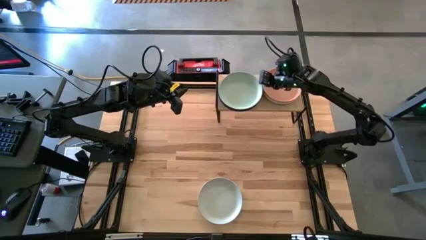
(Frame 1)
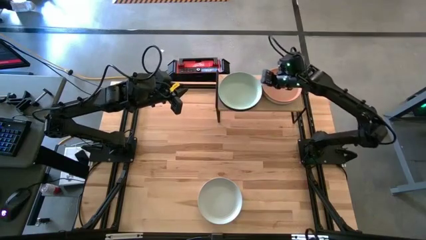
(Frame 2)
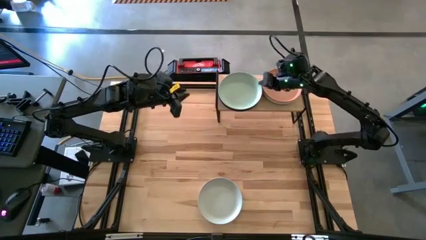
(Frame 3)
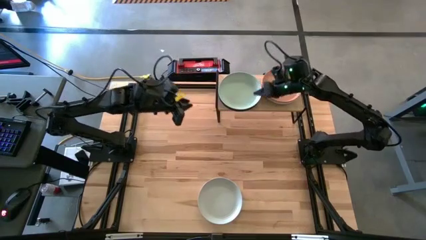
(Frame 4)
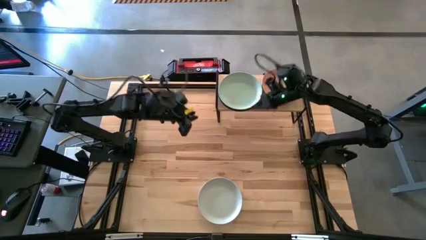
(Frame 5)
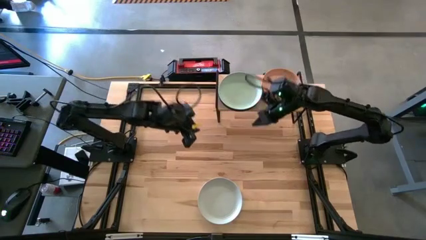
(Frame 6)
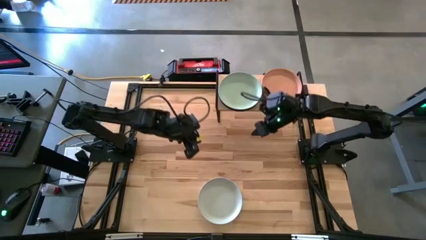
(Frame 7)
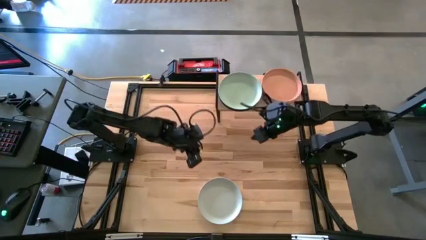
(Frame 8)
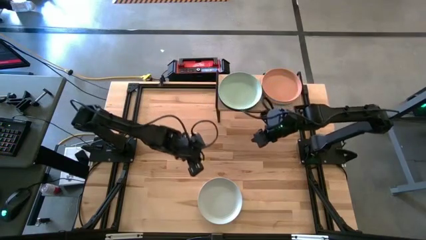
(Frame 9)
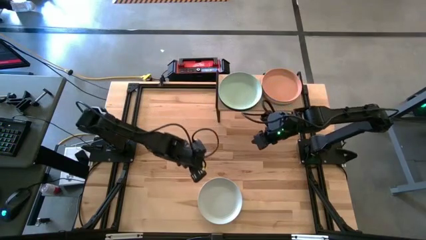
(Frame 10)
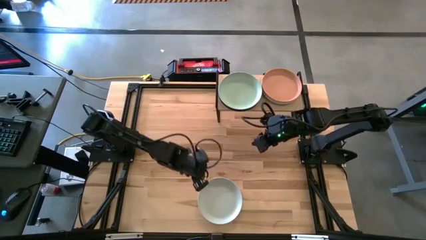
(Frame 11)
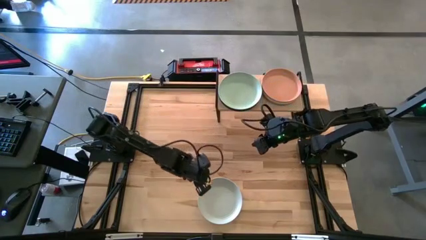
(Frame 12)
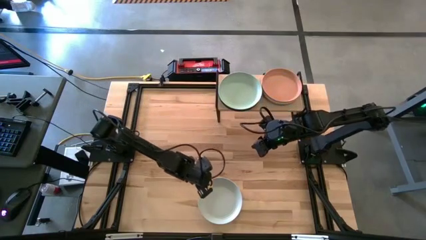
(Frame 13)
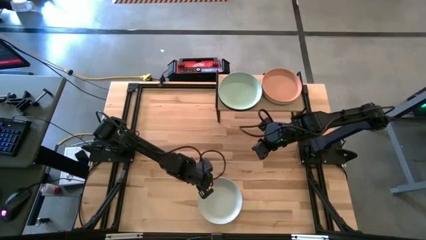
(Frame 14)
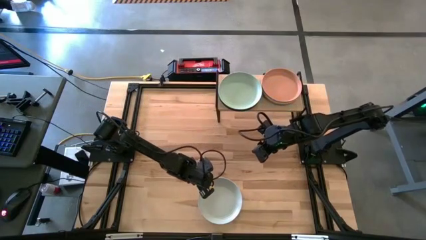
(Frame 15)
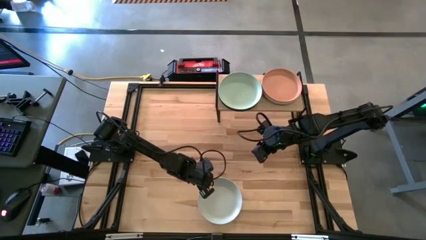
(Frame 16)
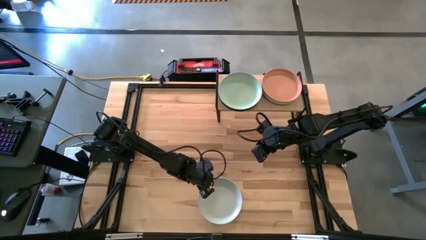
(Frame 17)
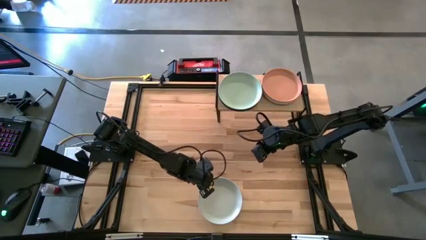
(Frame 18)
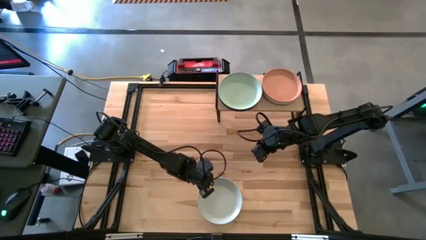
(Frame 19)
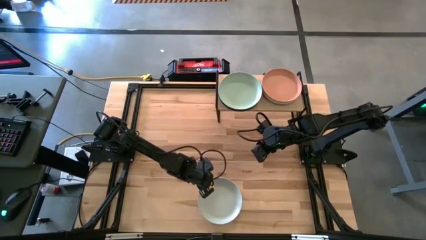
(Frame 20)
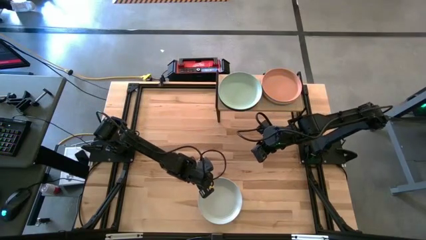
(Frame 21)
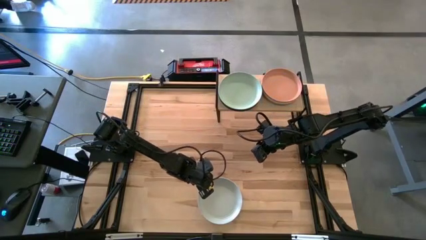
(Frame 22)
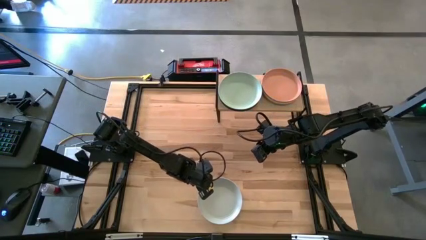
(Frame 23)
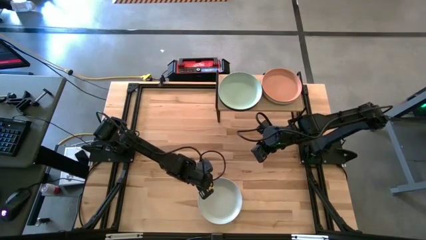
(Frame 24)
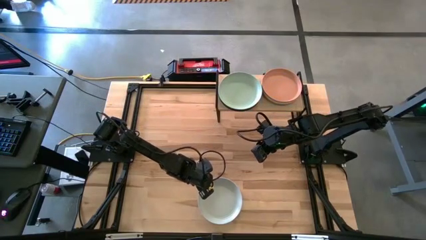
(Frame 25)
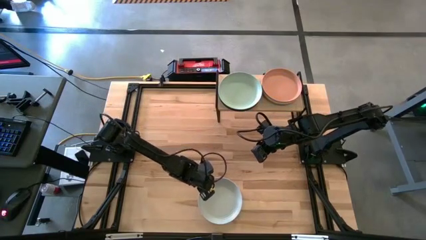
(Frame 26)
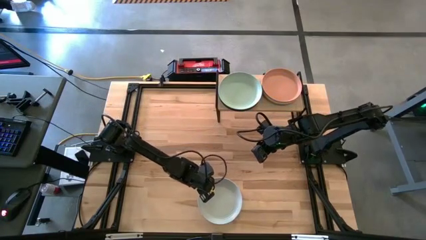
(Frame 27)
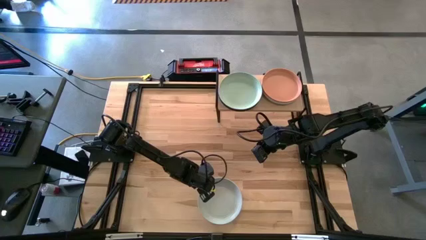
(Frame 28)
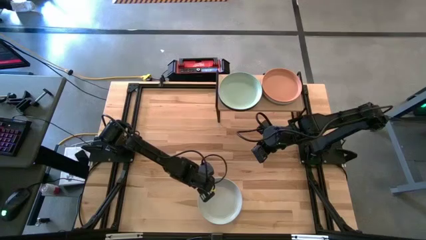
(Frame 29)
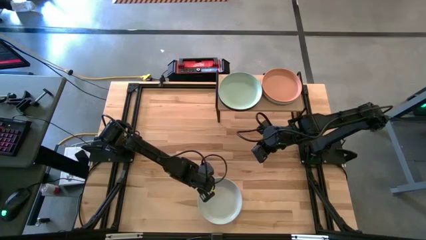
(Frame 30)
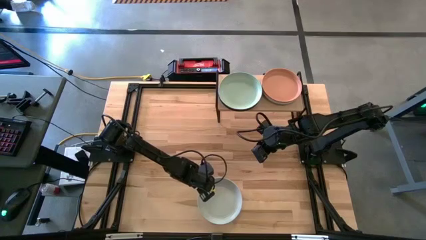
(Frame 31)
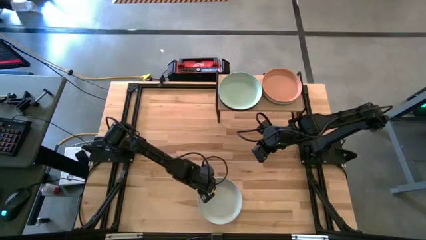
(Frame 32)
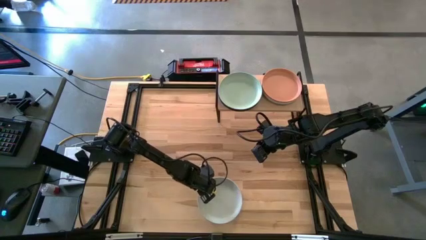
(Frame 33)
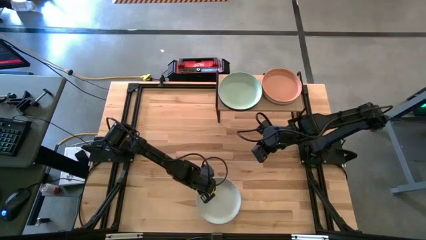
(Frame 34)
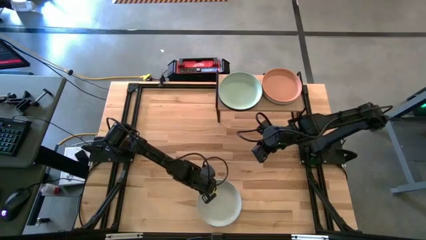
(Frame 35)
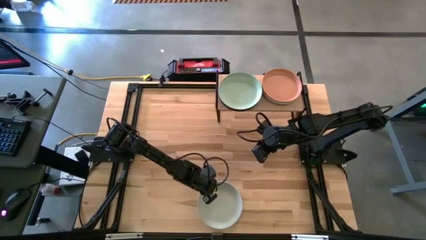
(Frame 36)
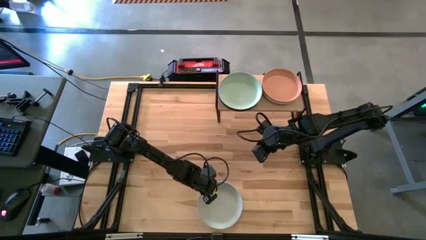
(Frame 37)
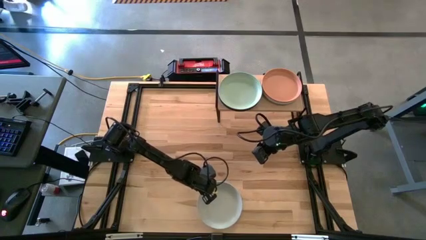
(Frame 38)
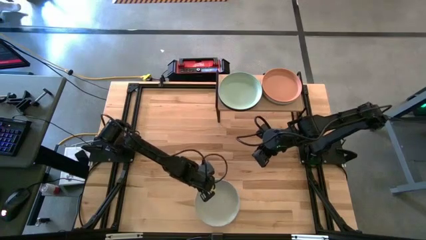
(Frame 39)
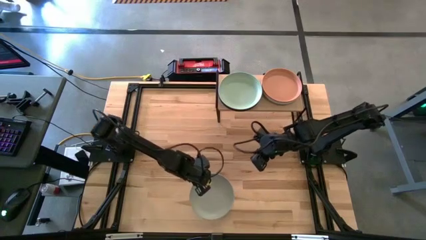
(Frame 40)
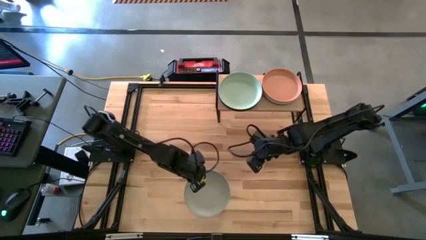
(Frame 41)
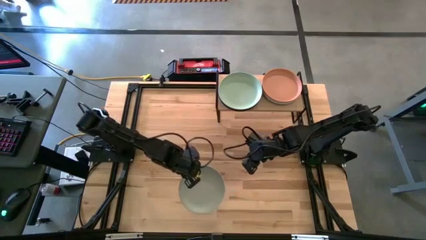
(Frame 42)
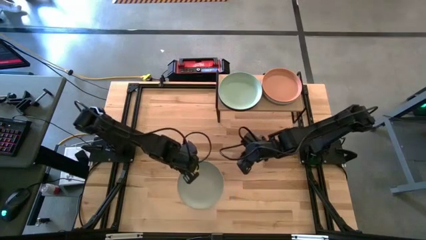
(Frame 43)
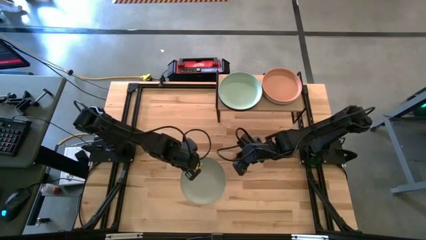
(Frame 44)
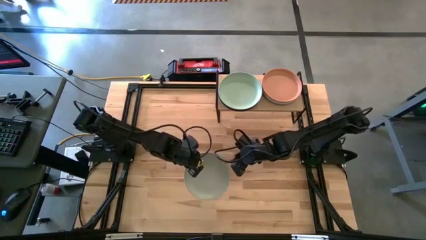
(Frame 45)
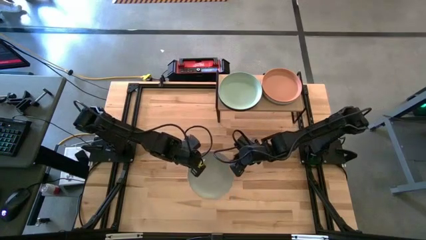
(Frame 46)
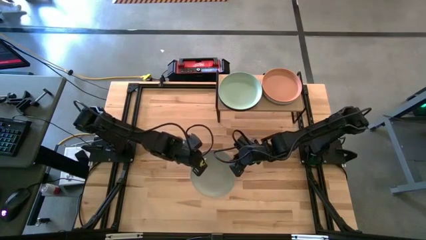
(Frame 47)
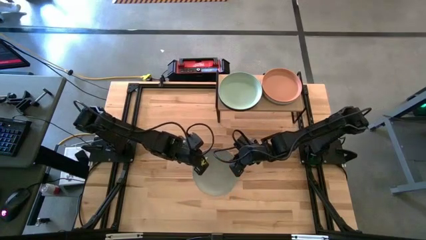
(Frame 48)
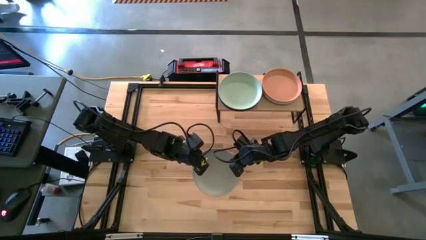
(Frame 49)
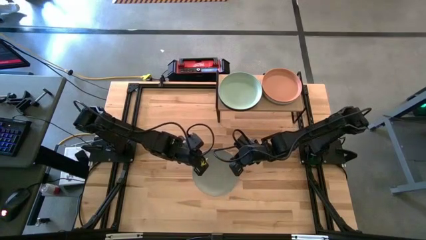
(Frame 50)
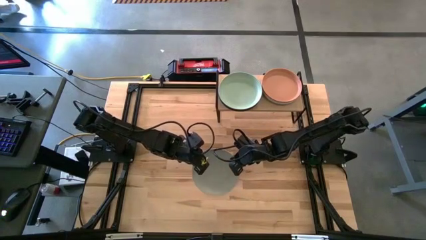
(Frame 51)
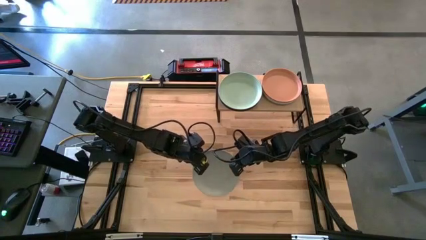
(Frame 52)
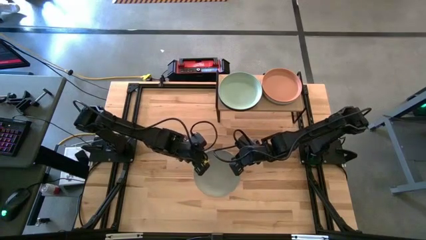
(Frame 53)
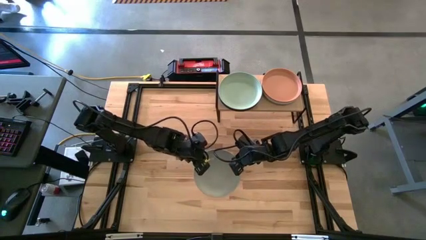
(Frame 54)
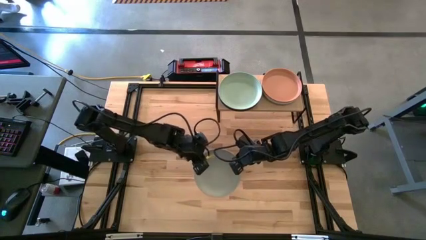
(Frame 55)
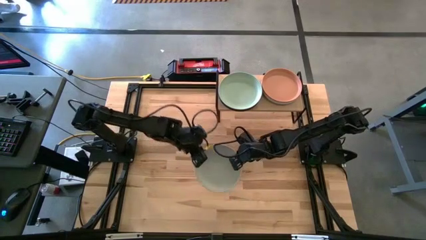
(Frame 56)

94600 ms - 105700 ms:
Task: Place and stack plates onto a shelf
Stack the gray plate on top of the light green plate on the shelf

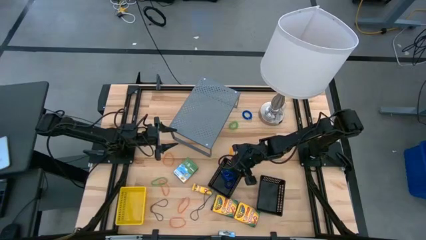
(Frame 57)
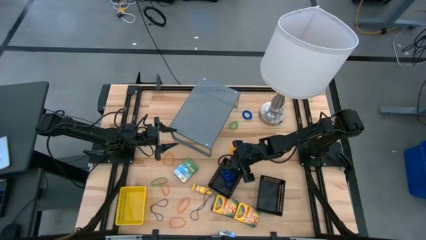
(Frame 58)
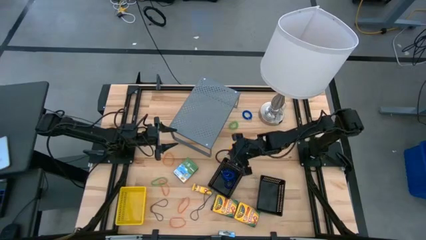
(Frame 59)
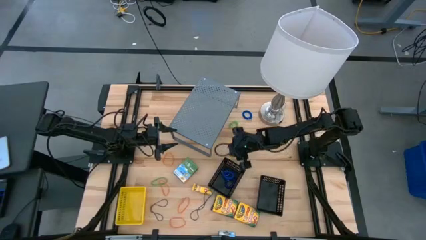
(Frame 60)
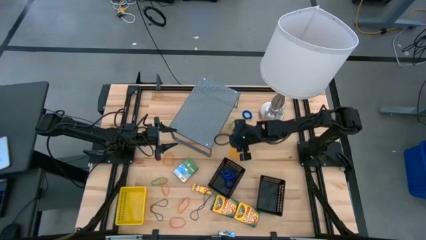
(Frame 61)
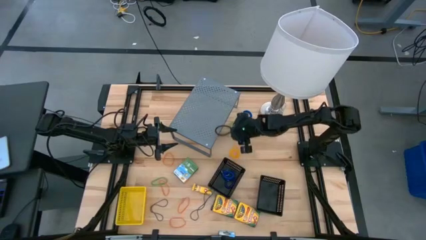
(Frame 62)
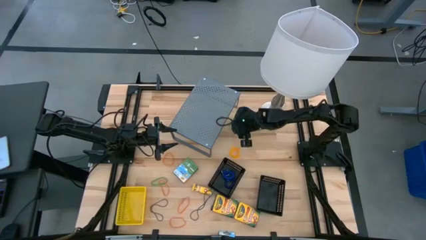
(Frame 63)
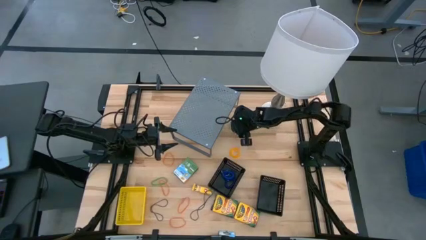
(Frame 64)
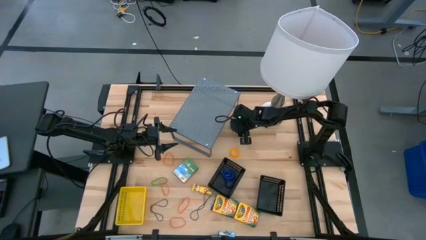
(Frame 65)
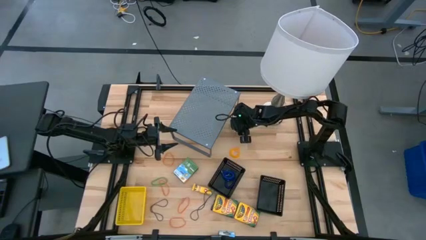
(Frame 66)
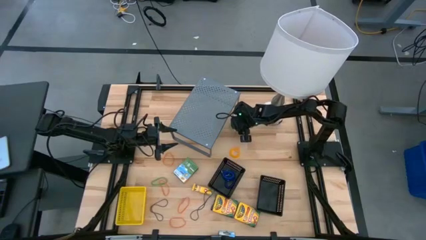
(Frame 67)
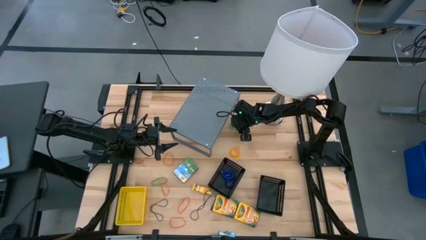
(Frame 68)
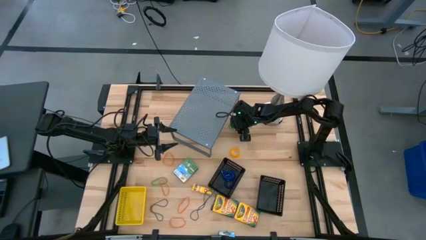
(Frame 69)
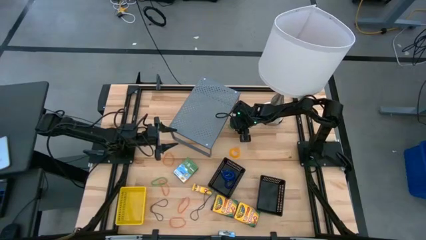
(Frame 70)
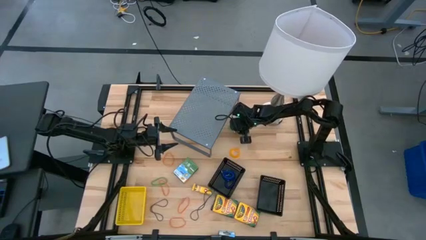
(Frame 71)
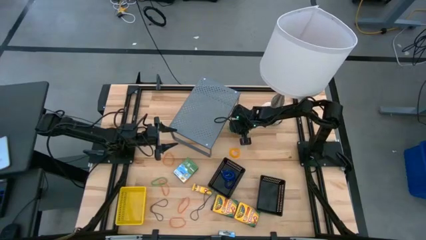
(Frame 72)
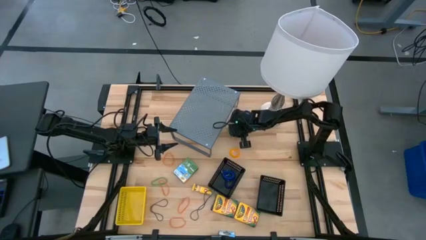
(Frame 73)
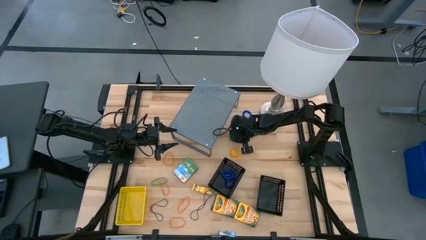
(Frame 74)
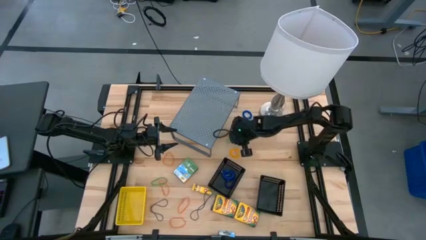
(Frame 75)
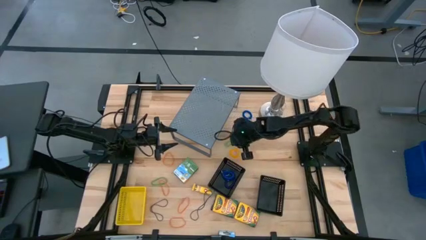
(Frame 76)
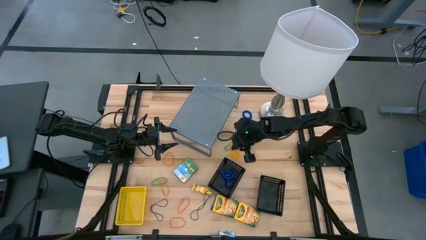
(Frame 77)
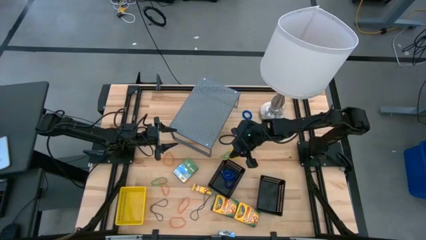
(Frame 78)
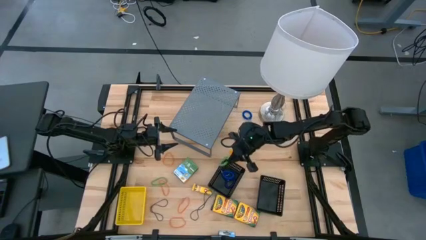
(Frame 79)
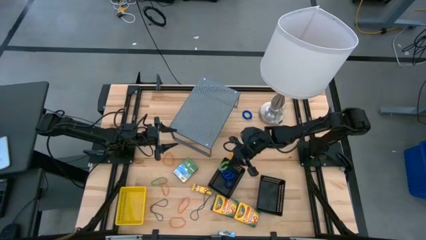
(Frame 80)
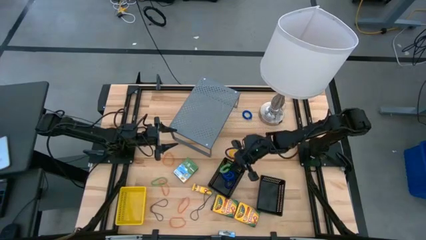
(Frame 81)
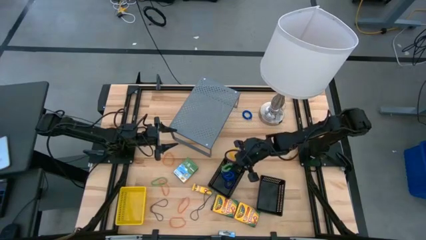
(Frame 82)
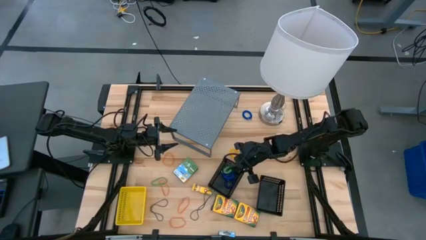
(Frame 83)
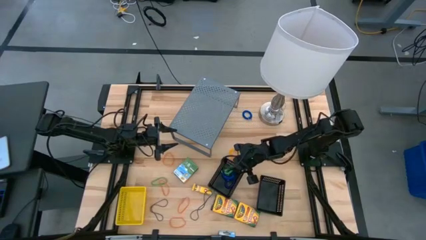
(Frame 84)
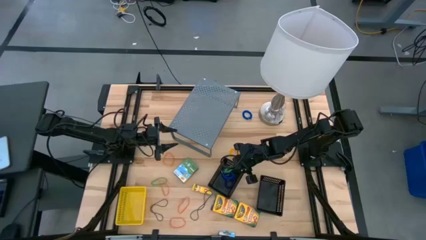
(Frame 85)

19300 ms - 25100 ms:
Task: Pick & Place Office Desk Supplies
Put the green spring keychain into the left black bin
